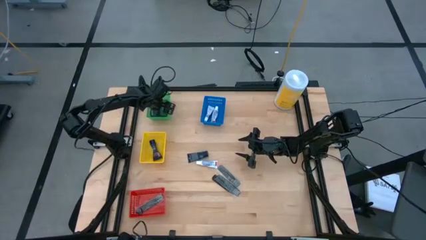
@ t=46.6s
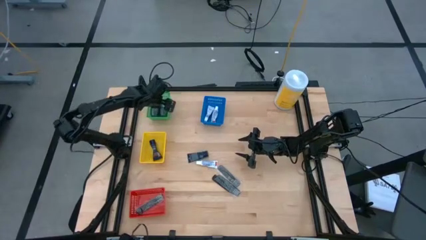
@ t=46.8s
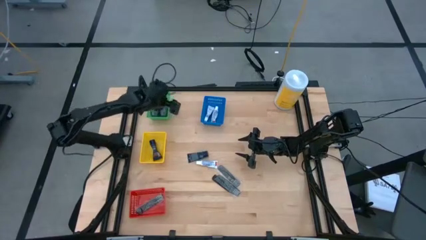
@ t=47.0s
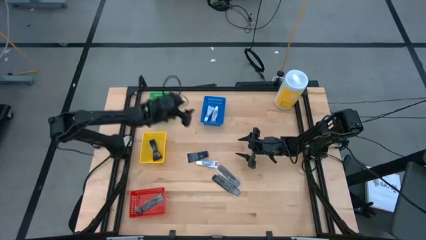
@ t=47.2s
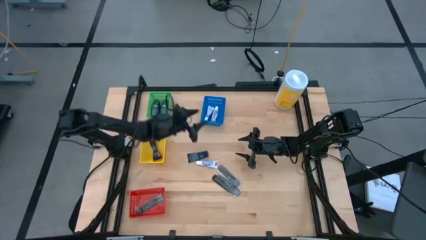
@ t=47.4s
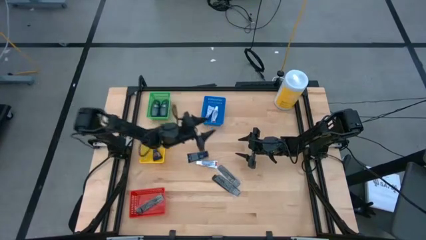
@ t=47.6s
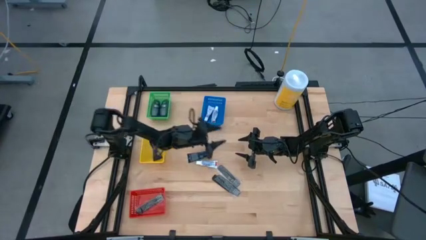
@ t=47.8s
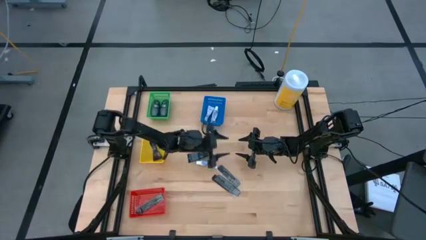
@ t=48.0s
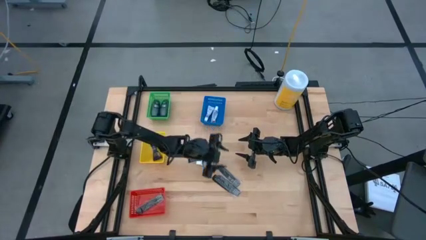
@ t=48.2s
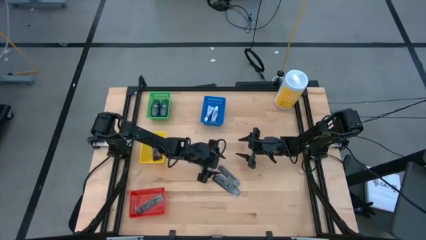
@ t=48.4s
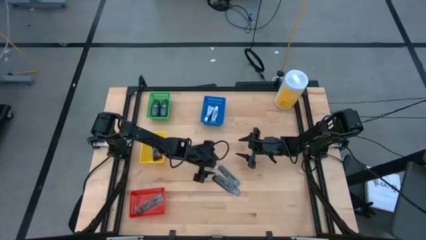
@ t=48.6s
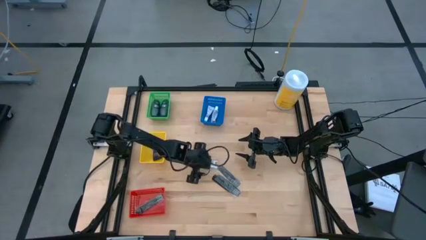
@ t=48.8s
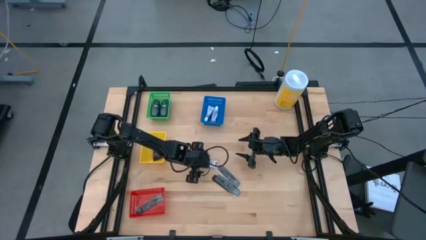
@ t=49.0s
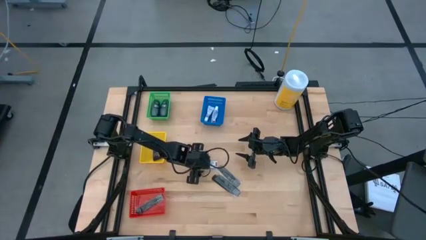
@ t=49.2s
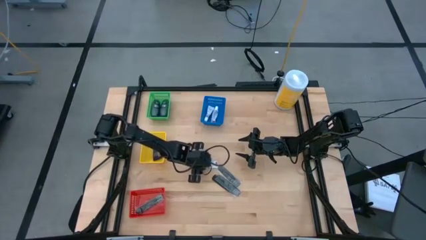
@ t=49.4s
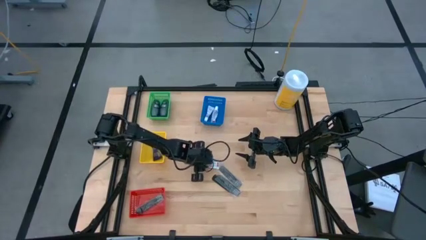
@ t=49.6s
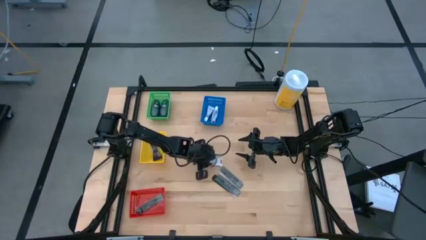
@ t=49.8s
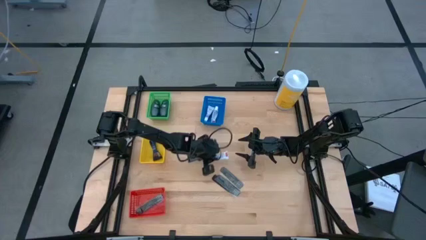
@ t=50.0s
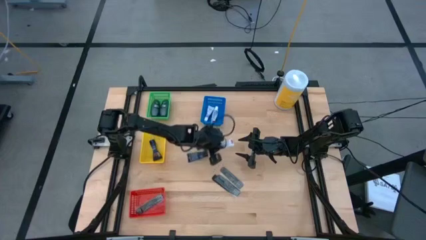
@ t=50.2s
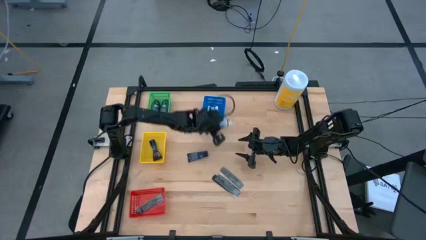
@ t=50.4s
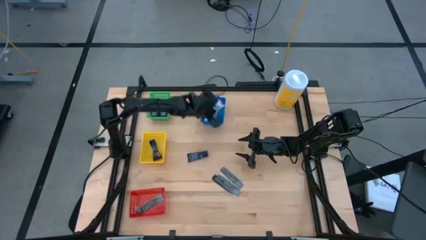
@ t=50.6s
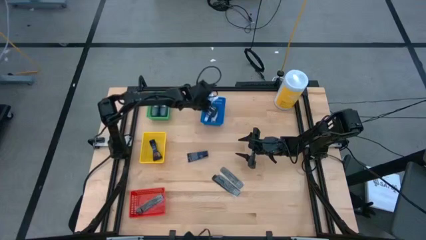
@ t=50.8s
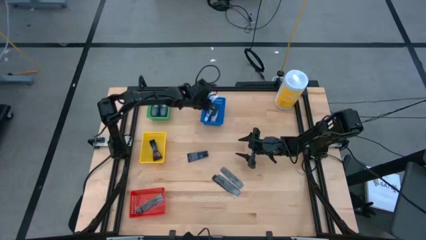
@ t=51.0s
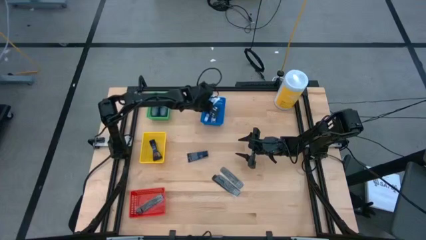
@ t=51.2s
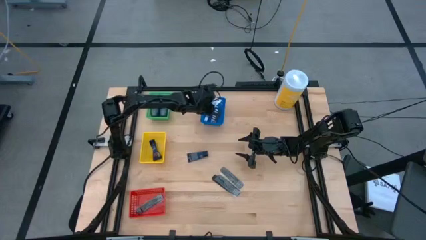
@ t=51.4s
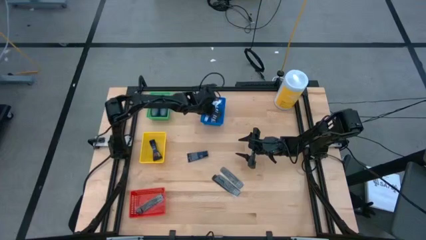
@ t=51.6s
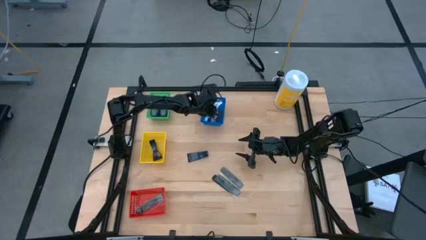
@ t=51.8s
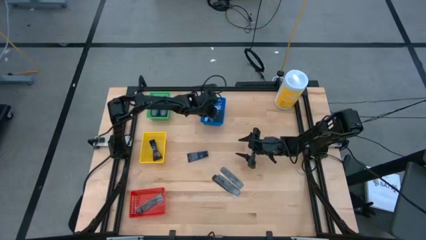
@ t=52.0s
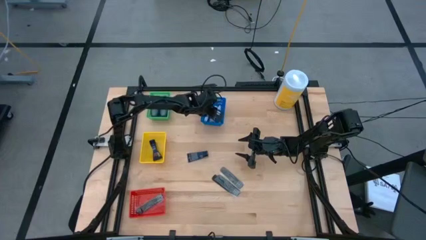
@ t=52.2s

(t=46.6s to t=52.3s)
Task: Pick & Place Travel size toiletries
Put the white toothpaste in the blue basket

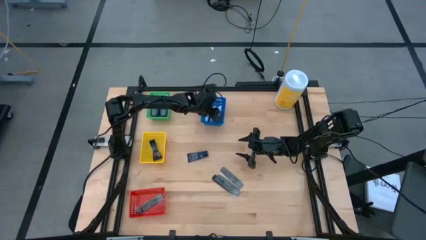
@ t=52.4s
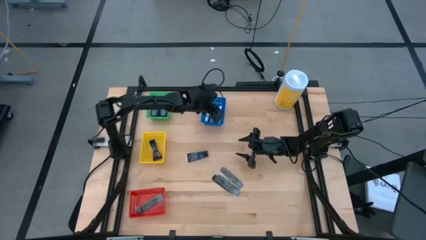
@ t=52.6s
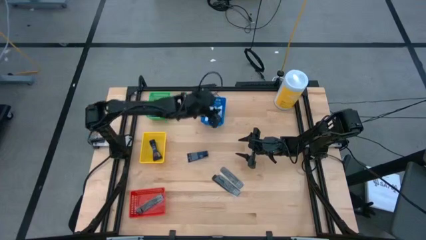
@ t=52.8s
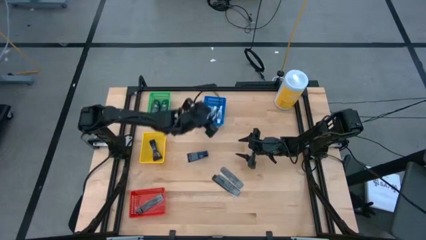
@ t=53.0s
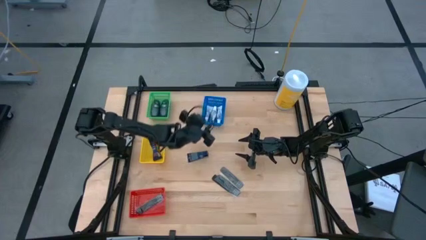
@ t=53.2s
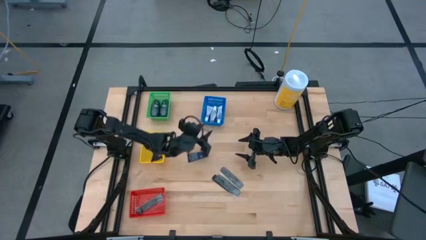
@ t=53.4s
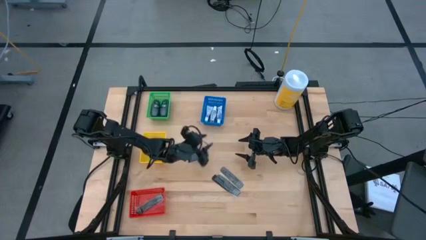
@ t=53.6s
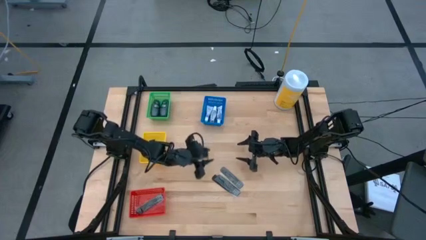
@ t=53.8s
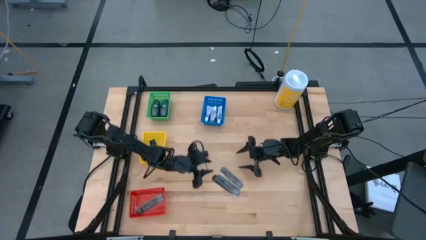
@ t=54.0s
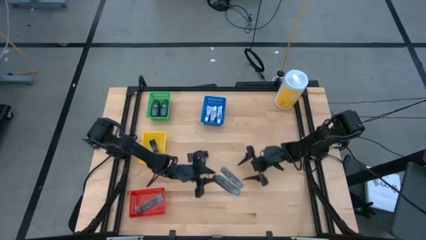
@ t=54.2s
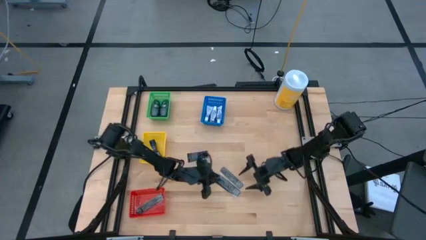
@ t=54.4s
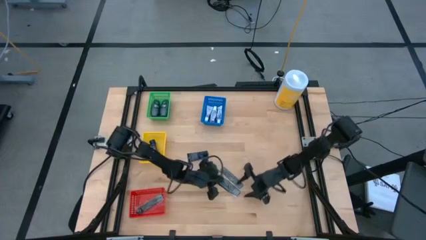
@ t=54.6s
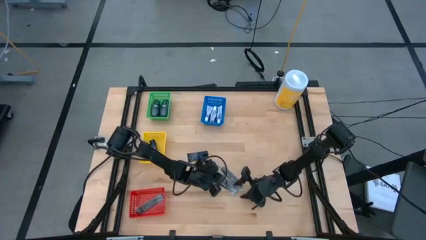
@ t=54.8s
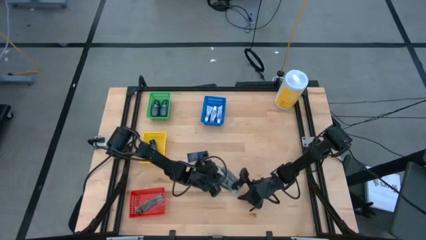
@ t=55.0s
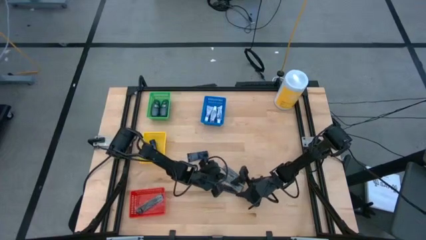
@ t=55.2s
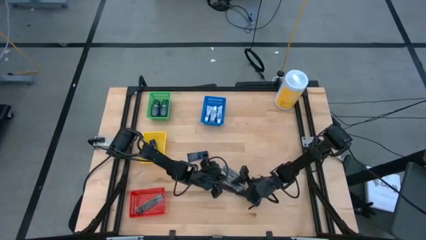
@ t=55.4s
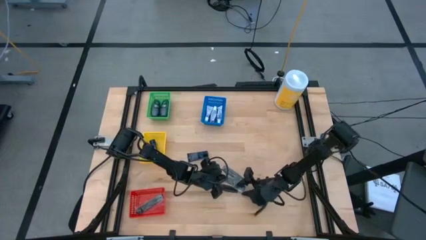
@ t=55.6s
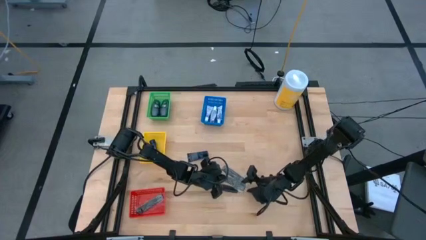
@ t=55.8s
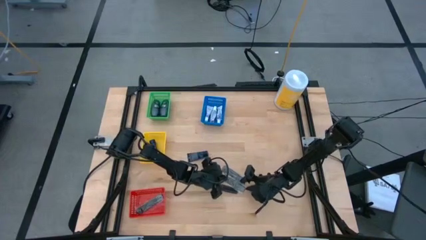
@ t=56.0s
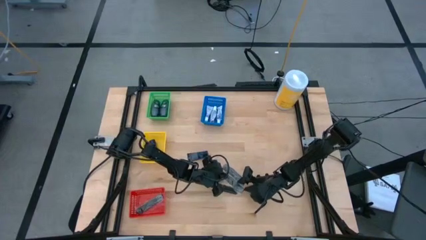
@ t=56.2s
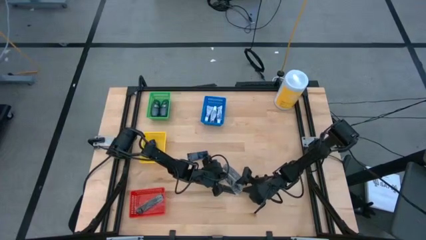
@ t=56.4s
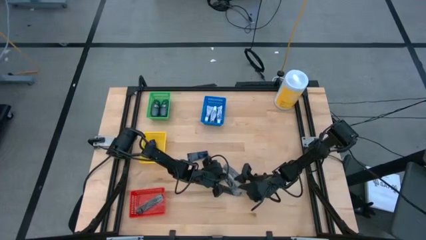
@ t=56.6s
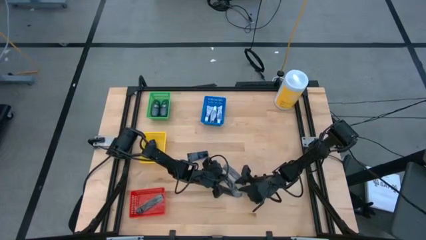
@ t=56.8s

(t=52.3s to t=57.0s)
Put the black comb in the red basket

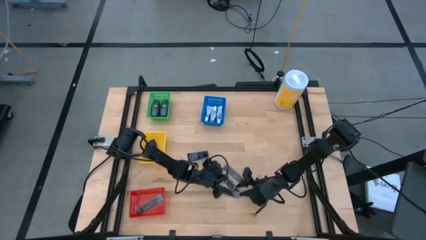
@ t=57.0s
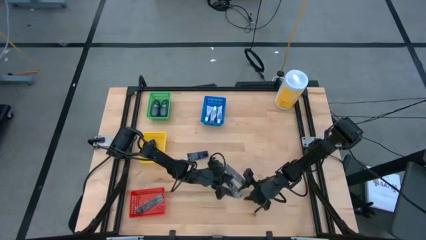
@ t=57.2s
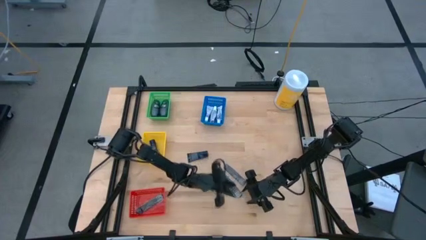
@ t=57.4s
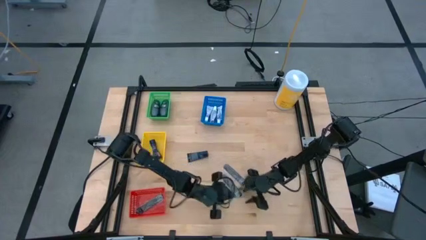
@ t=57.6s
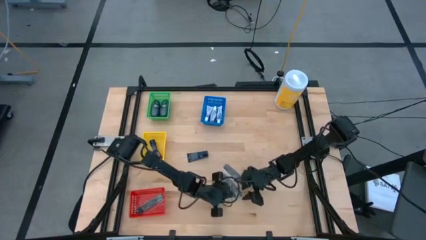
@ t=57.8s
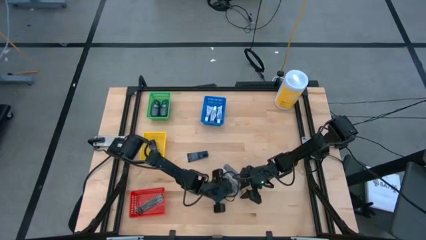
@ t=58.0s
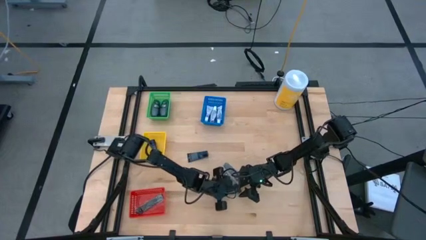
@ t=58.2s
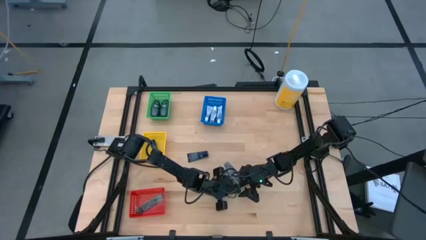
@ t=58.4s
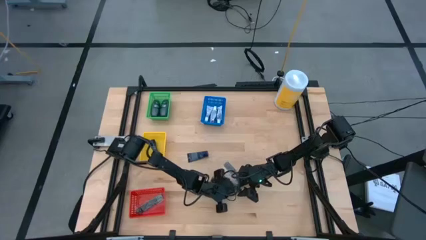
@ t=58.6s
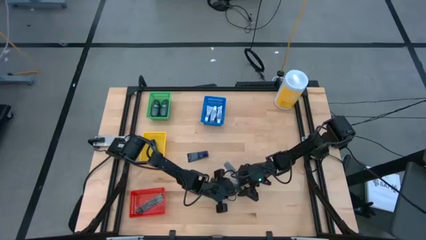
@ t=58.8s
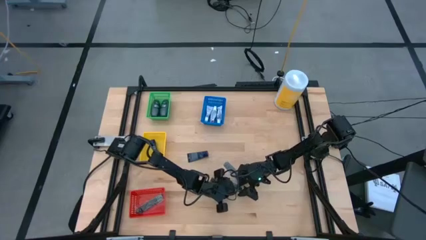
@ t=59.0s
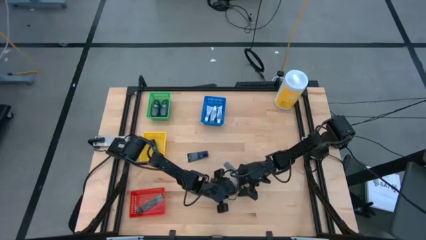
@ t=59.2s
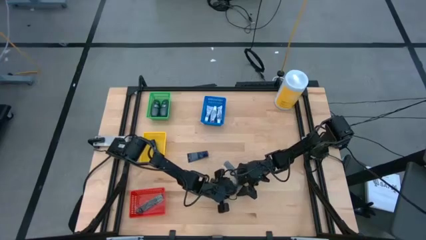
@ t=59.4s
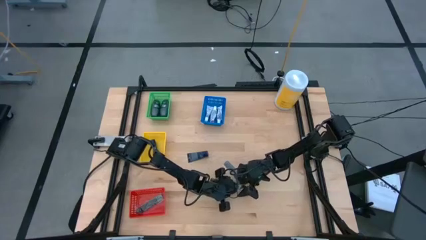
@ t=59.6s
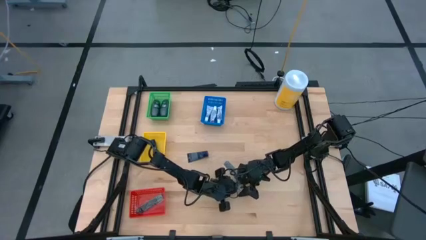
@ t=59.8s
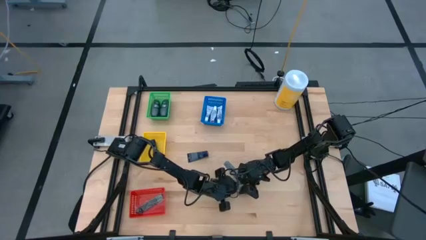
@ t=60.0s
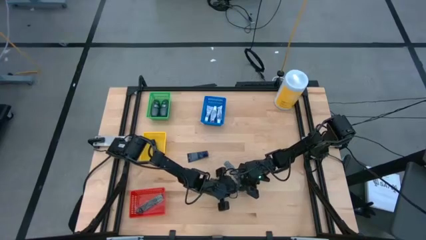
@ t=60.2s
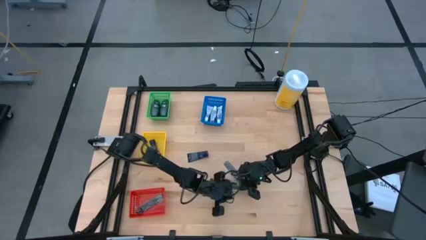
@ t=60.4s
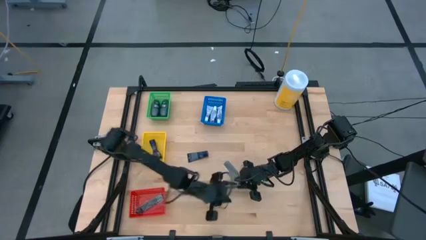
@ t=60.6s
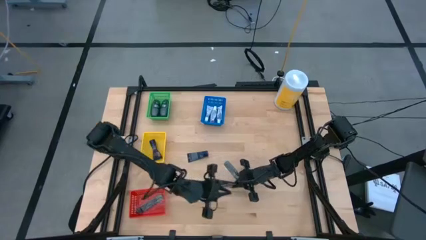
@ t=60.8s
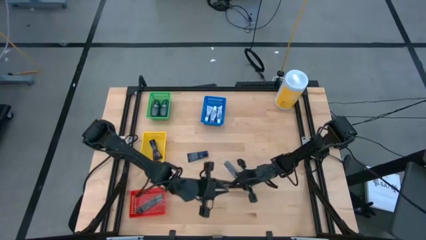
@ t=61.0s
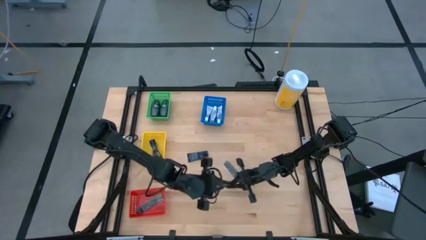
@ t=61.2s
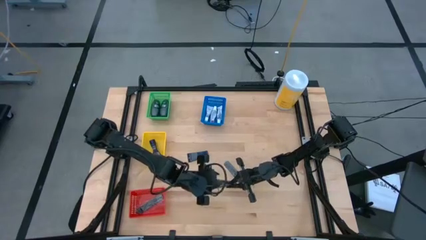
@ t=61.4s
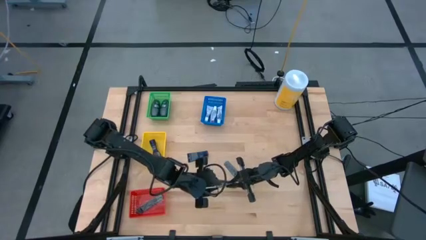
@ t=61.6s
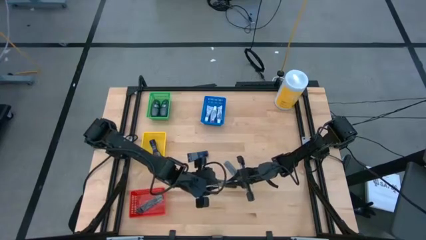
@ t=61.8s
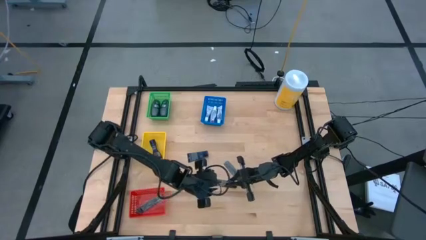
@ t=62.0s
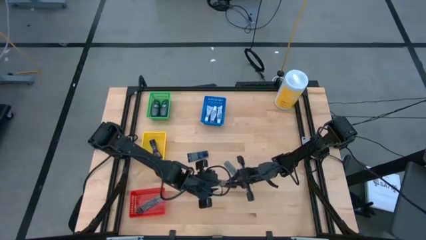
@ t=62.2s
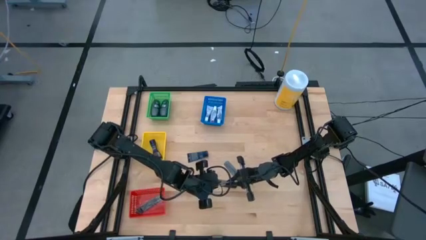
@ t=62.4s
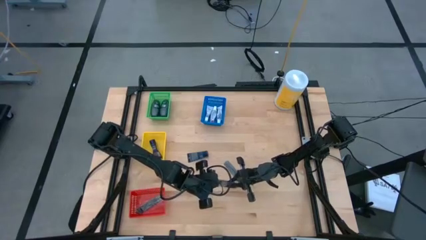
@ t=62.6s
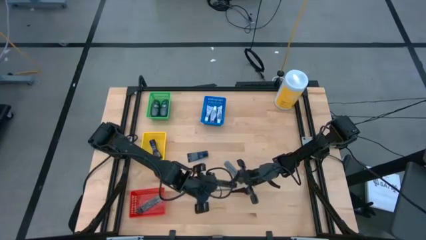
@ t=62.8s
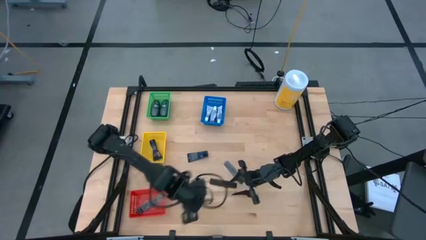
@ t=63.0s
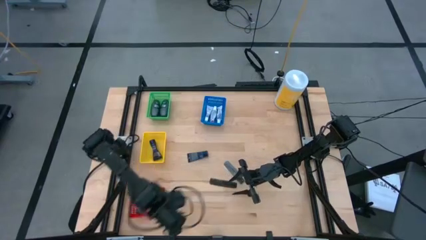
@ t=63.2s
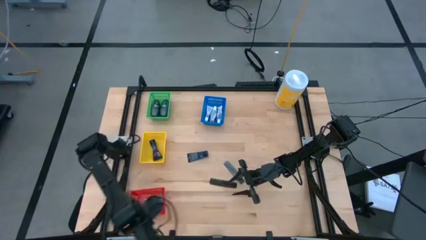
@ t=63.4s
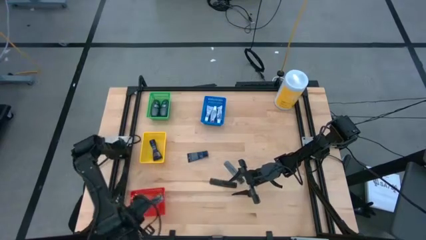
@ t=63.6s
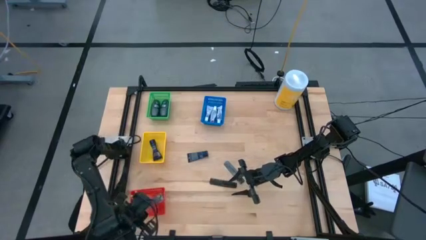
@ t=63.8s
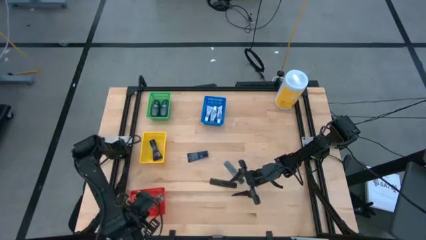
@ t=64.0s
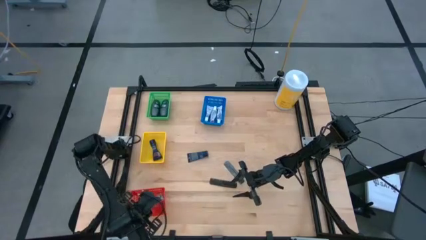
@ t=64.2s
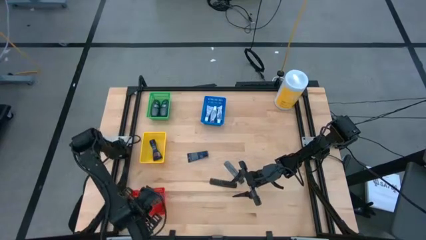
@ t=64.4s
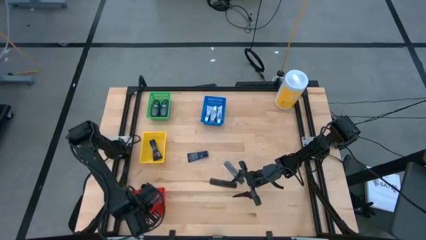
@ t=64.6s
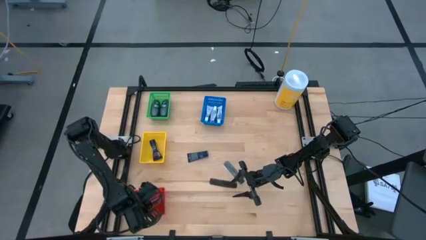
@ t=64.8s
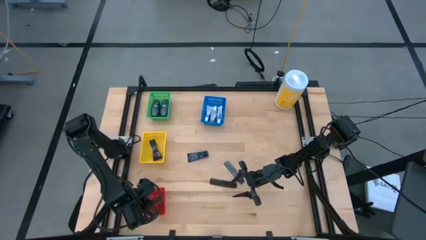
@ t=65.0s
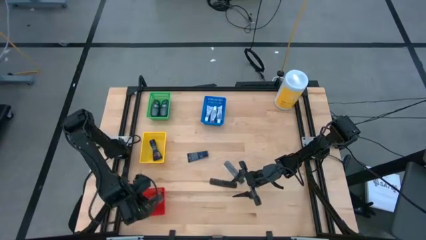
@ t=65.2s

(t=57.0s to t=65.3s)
Put the black comb in the red basket
